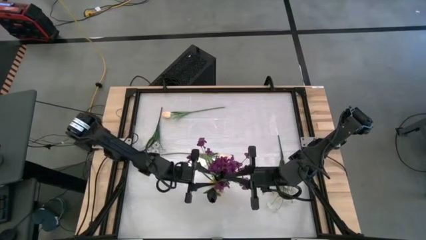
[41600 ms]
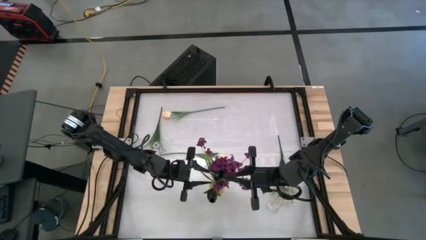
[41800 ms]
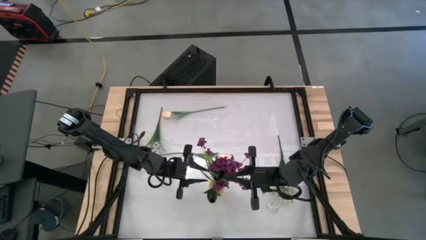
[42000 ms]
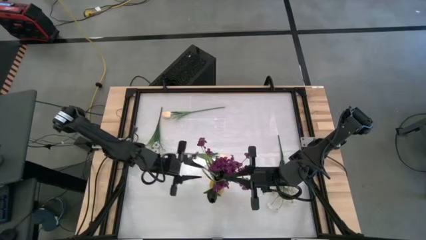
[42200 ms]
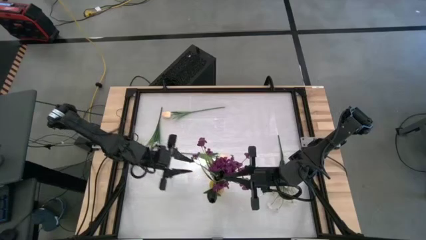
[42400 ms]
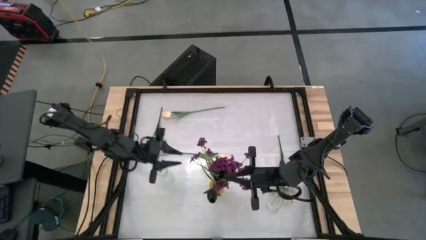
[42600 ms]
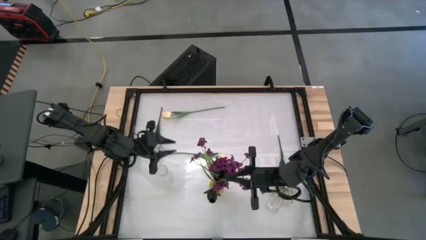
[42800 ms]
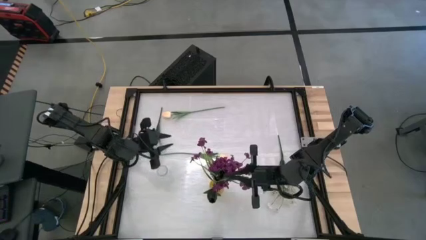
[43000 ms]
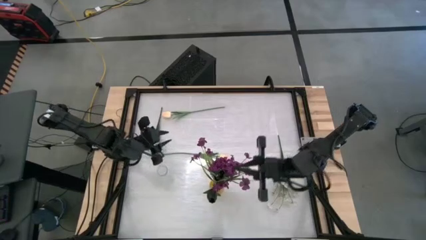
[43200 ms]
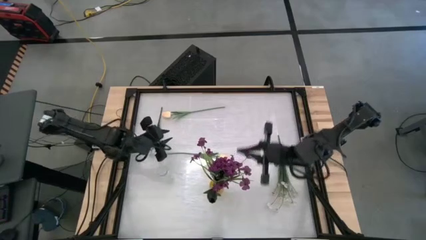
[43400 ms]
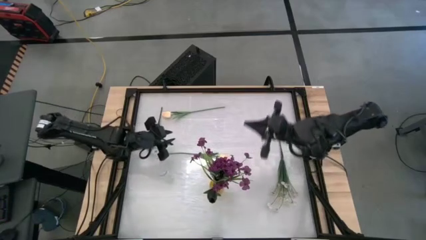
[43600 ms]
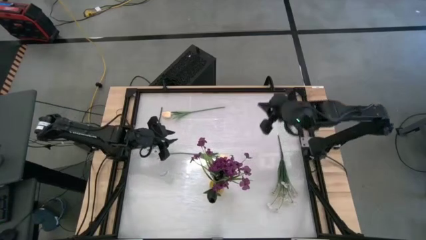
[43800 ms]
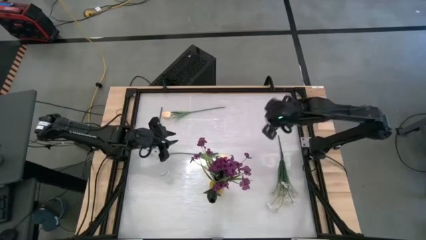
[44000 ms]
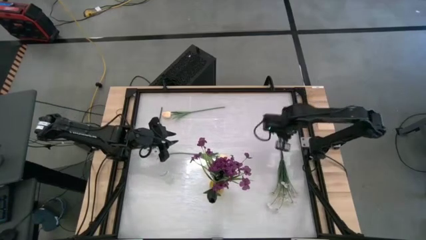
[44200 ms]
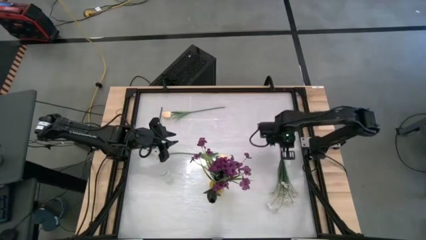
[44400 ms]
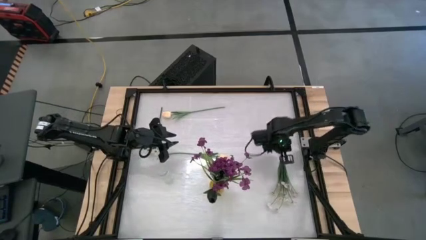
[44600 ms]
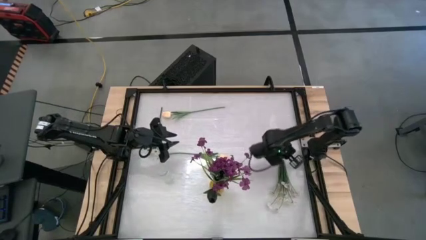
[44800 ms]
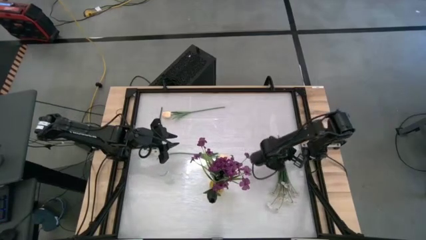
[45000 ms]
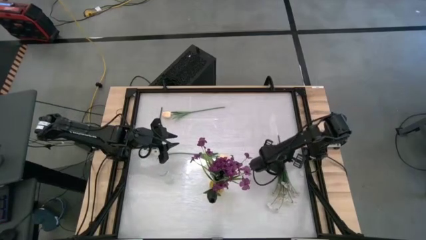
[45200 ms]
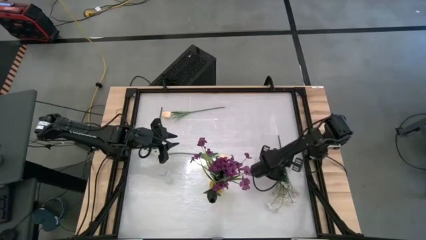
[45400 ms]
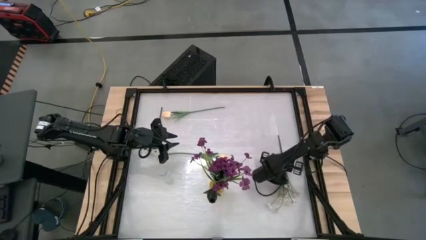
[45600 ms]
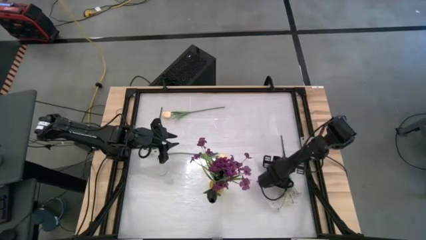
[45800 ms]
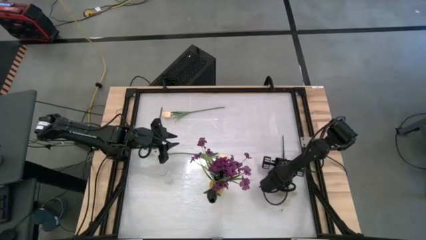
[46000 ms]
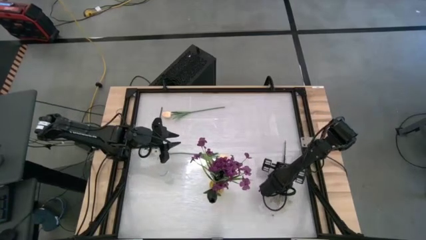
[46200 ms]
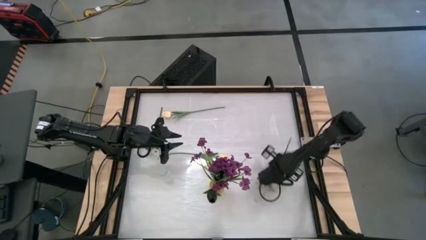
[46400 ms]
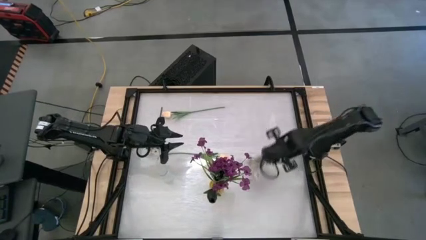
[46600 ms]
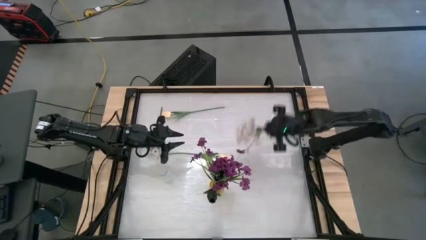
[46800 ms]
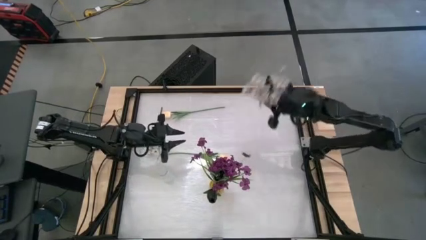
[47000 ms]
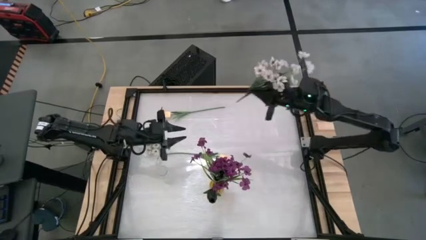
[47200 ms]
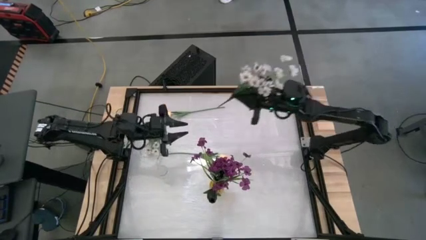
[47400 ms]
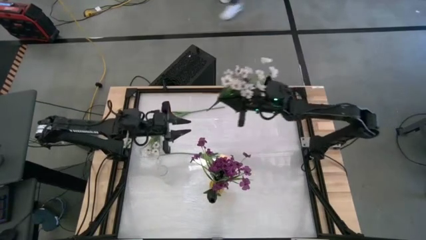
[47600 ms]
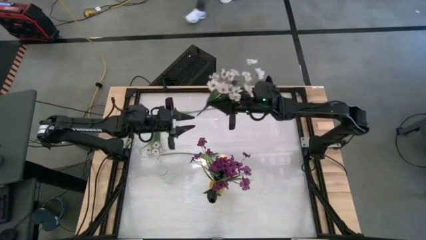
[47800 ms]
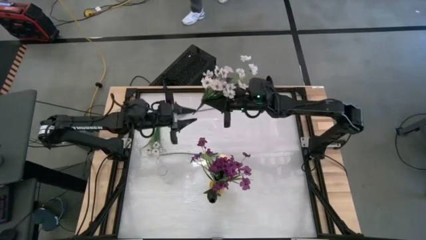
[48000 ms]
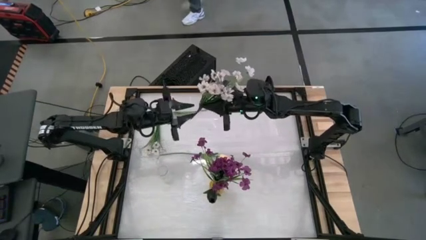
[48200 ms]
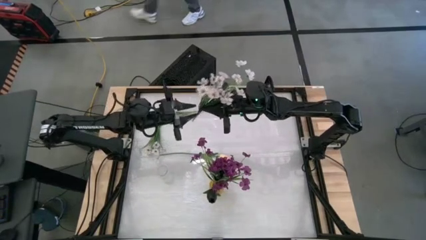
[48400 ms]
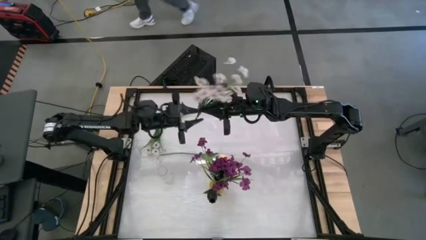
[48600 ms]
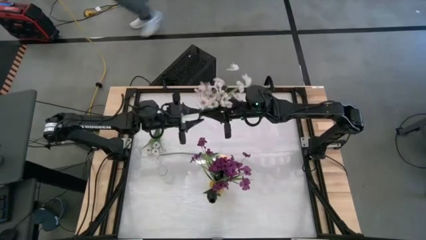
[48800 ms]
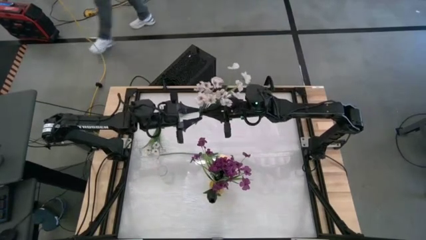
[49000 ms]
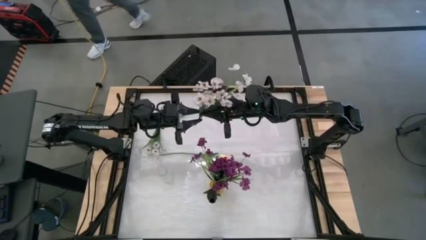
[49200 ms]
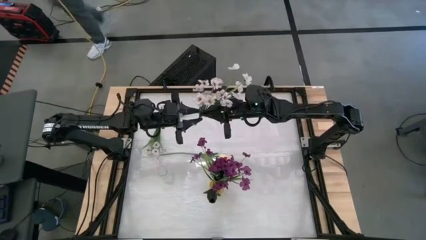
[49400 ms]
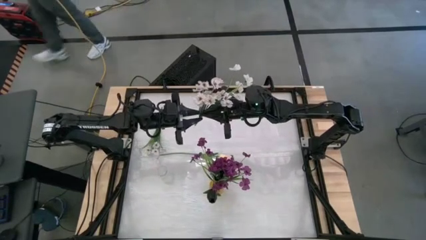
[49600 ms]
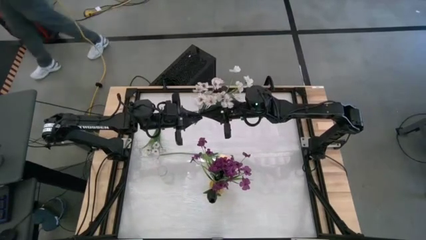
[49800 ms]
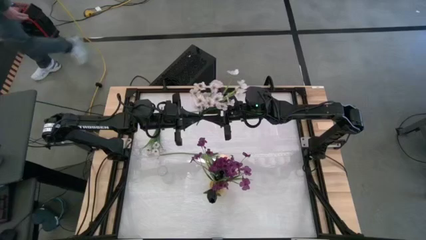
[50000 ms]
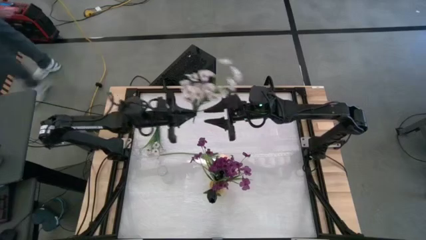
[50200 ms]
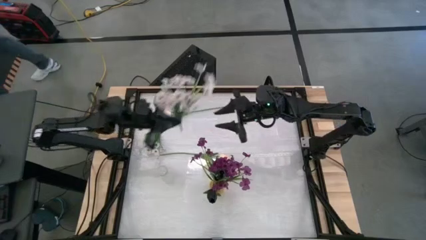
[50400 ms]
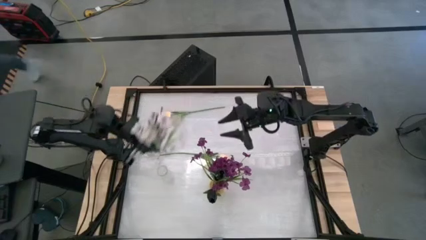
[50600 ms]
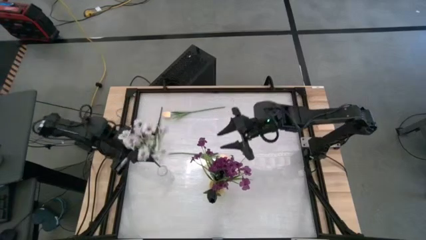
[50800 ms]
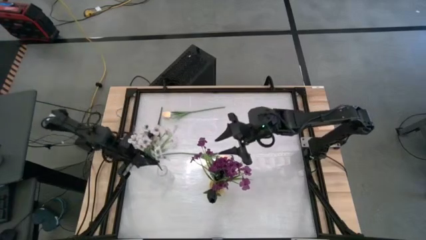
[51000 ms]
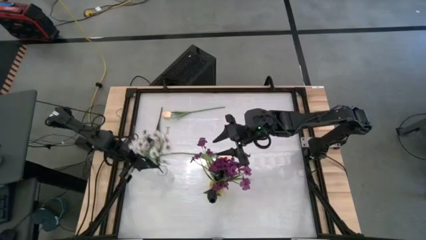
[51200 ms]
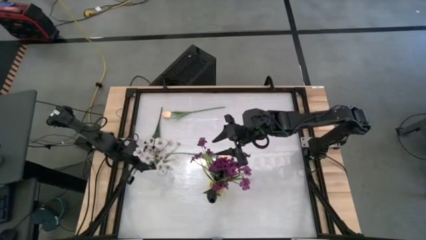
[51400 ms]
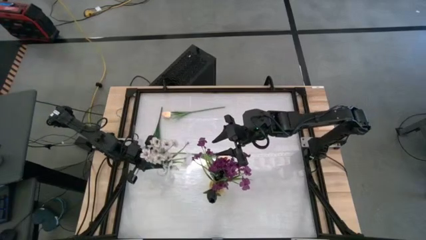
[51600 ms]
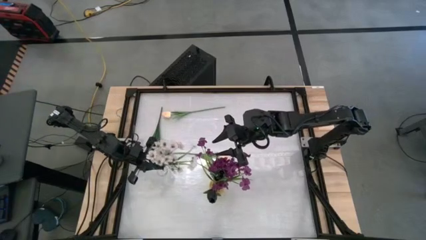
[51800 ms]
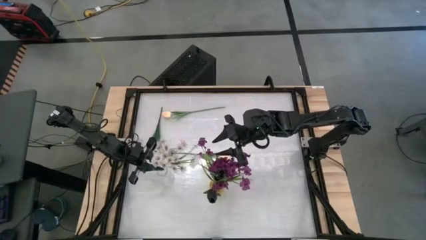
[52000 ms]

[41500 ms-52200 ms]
Task: Sort flowers into vase by color
Put the bottom white flowers into the transparent vase

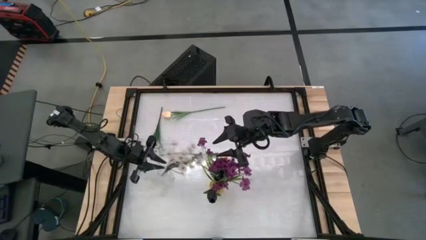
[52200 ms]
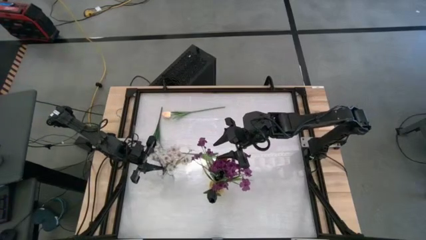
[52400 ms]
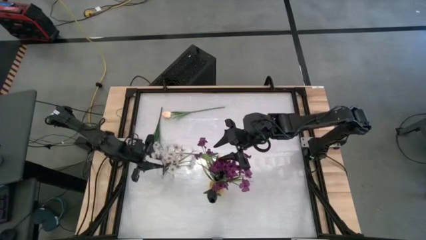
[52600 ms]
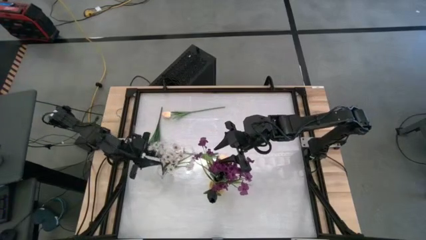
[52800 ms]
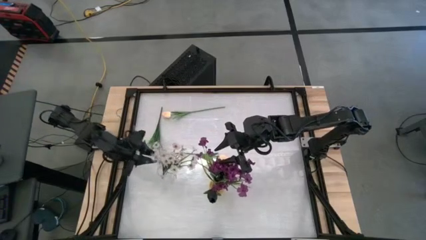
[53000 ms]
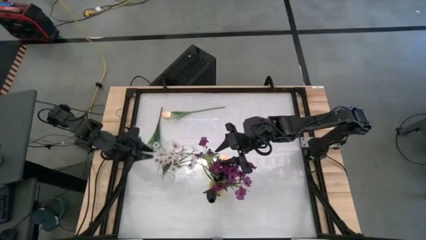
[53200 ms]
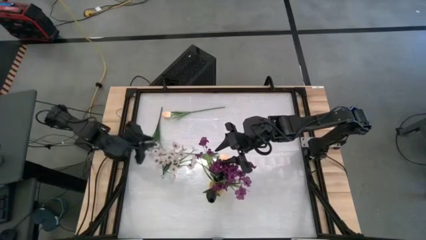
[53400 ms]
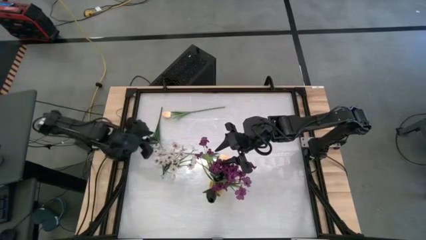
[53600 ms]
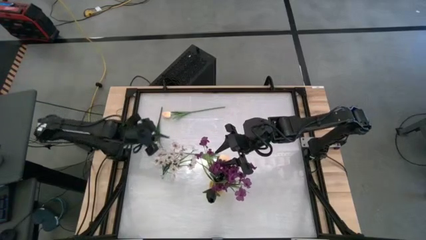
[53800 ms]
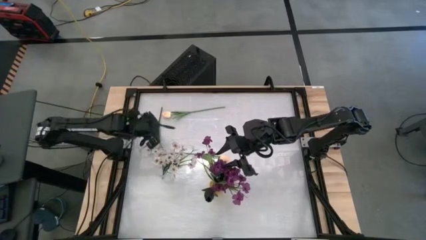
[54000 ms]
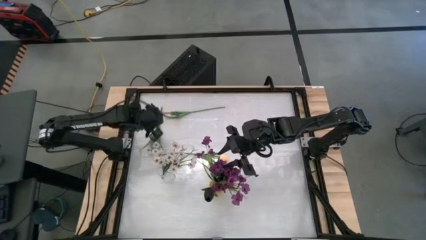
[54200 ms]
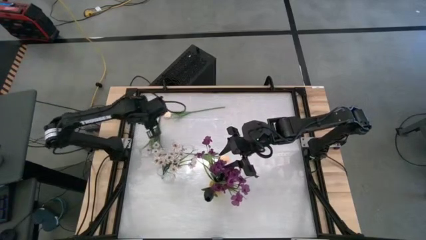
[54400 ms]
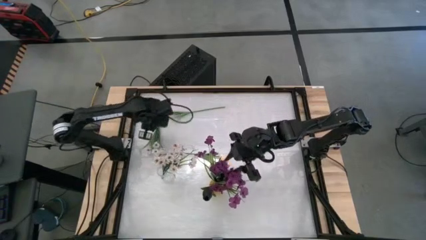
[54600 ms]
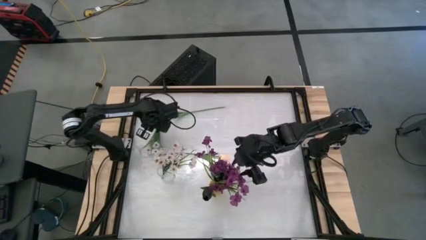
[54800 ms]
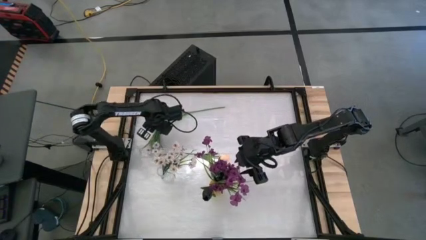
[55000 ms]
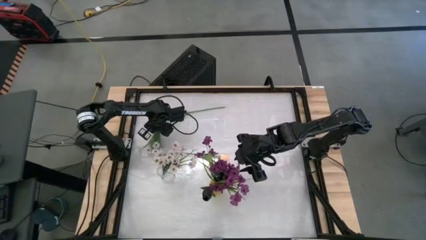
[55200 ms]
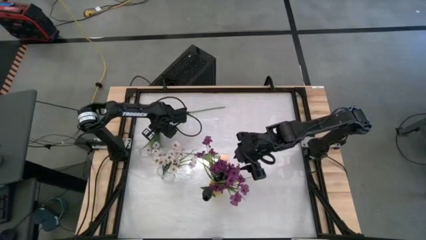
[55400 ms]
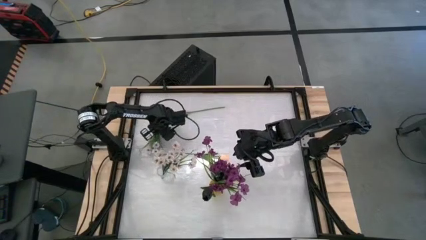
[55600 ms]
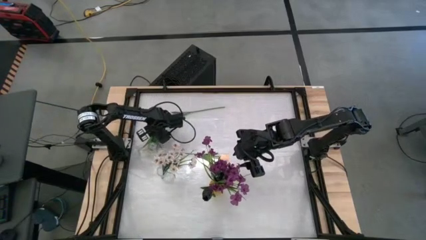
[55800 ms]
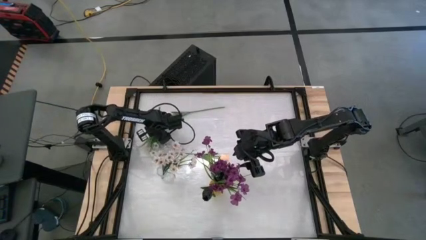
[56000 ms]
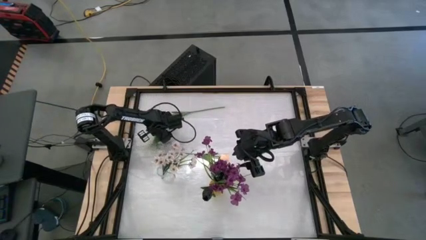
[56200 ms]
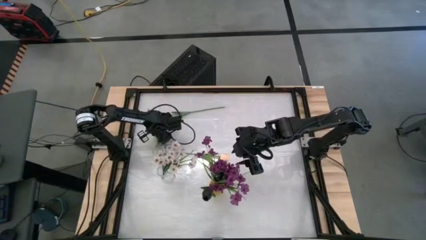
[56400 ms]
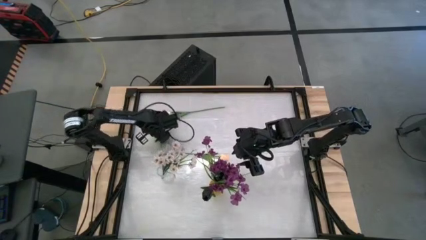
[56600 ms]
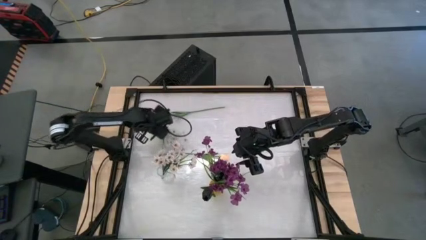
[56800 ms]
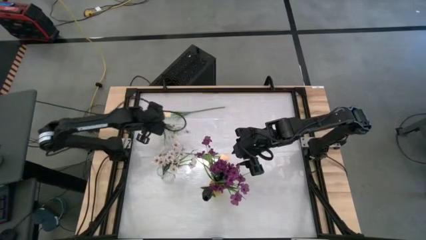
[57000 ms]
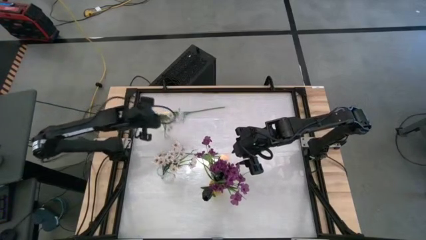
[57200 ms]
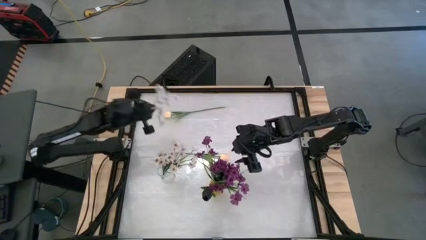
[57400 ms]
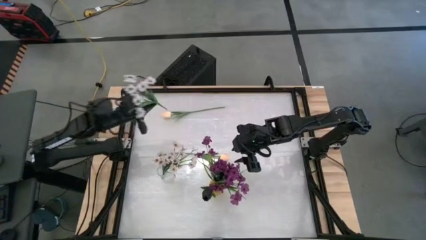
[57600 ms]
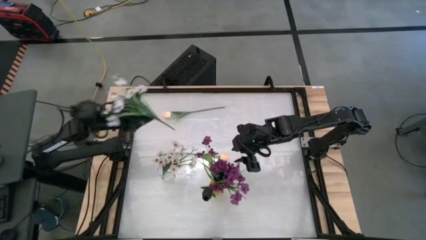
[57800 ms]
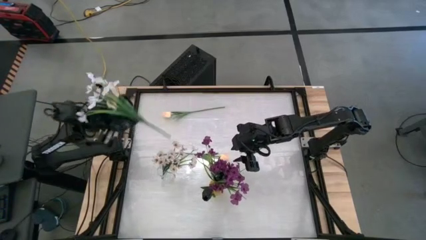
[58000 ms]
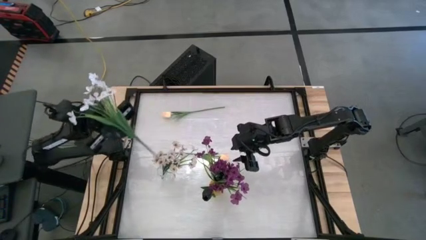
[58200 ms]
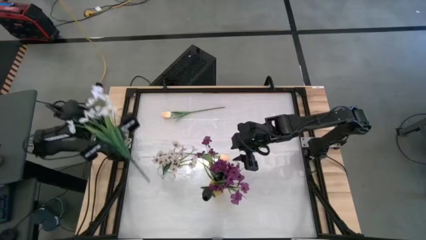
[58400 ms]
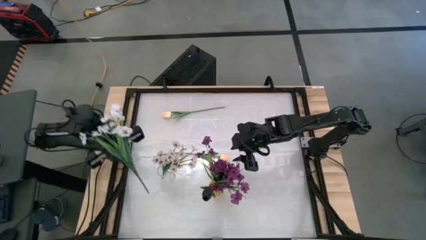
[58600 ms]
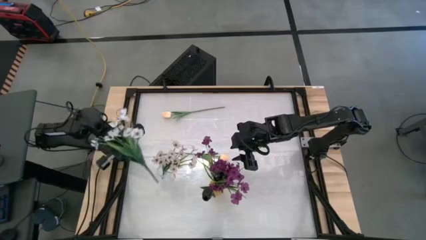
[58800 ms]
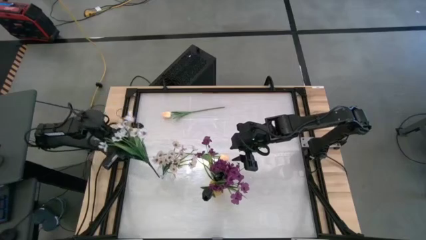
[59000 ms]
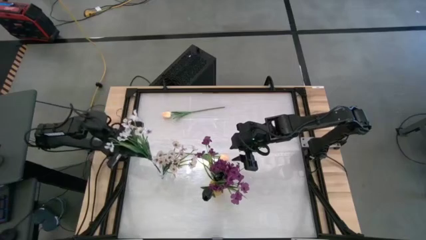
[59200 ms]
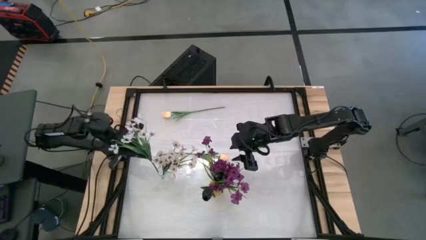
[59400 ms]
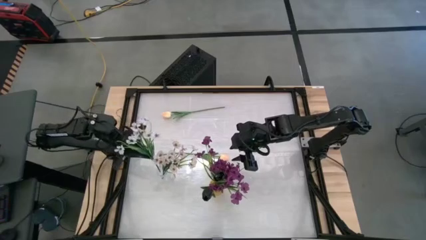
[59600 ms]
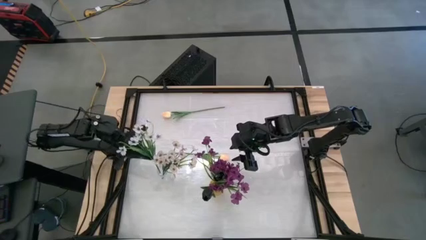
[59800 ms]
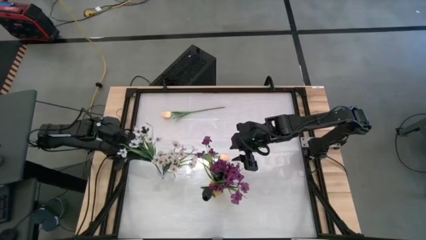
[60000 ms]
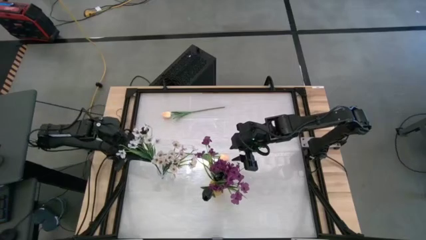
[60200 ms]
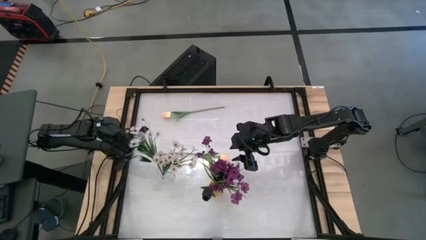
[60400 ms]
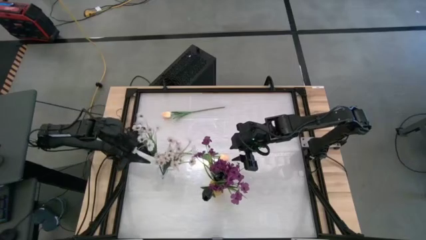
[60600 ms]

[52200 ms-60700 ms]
Put the white flowers into the transparent vase
